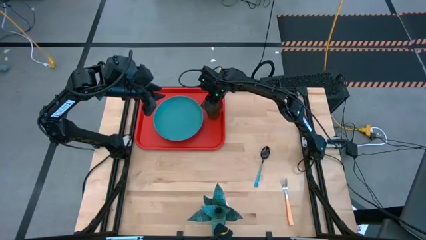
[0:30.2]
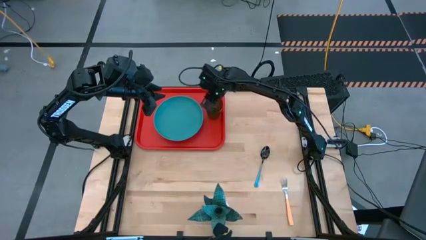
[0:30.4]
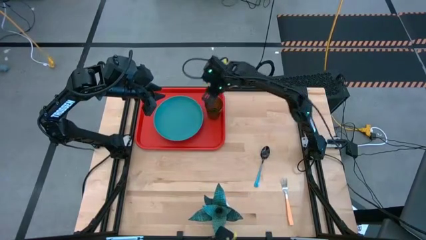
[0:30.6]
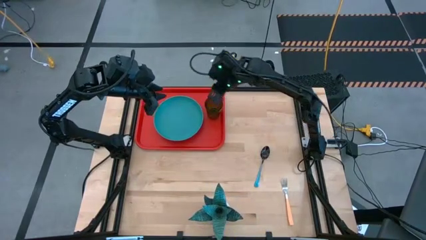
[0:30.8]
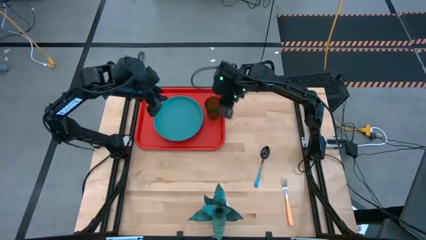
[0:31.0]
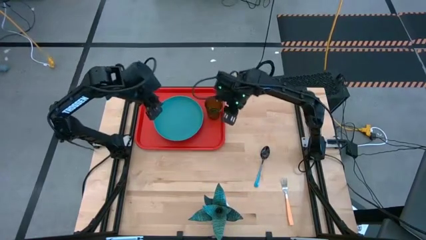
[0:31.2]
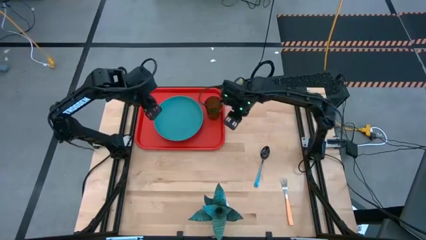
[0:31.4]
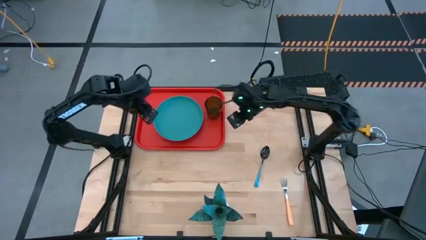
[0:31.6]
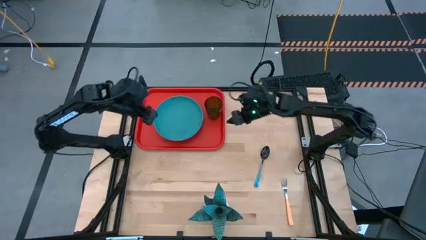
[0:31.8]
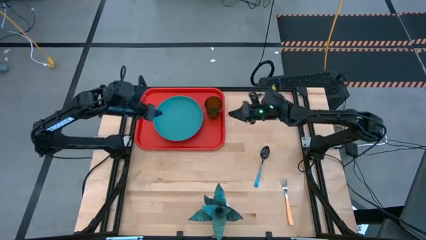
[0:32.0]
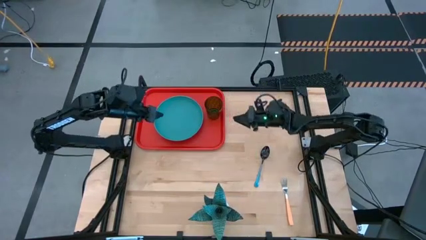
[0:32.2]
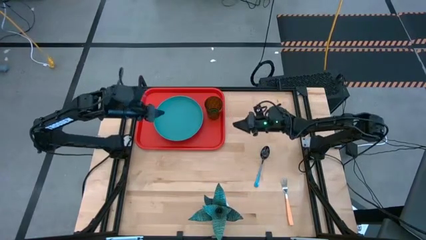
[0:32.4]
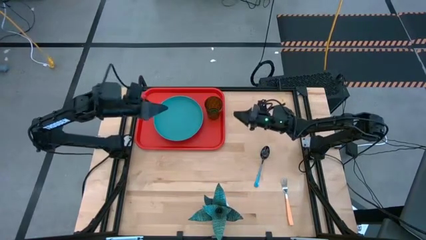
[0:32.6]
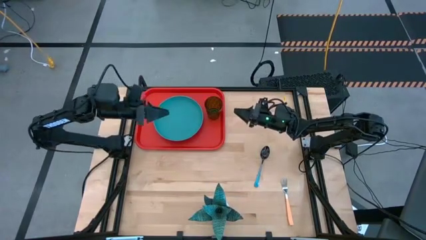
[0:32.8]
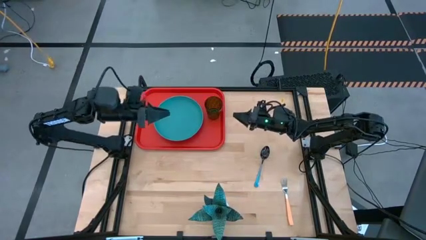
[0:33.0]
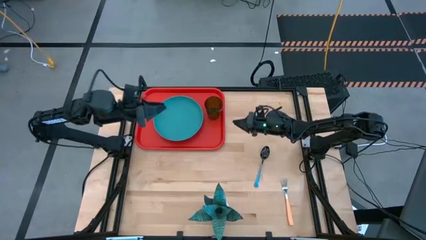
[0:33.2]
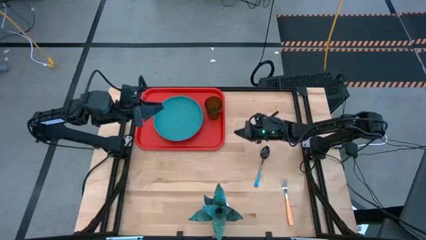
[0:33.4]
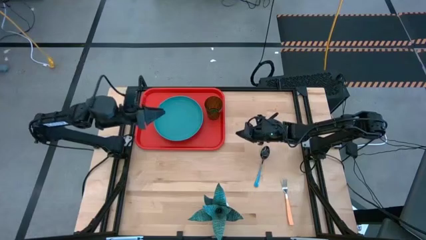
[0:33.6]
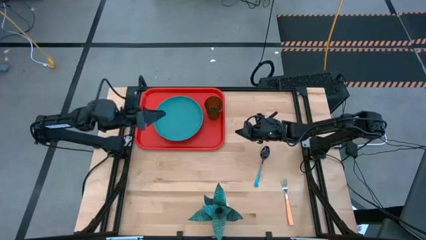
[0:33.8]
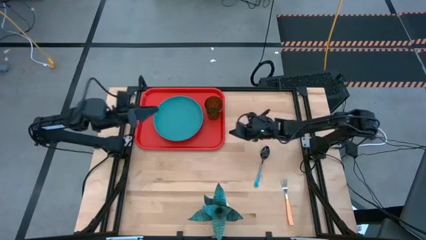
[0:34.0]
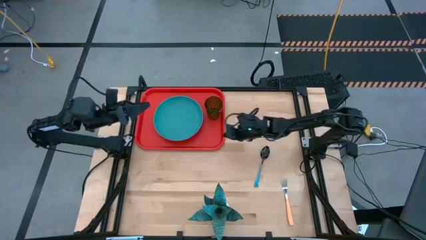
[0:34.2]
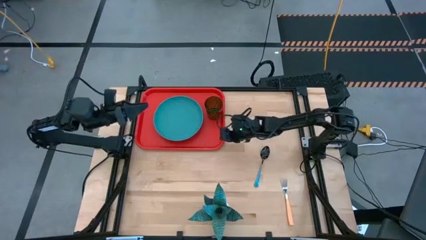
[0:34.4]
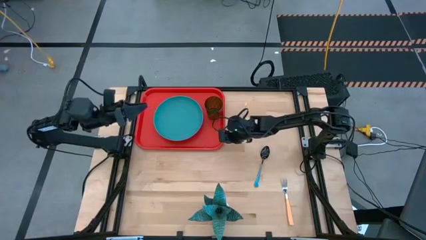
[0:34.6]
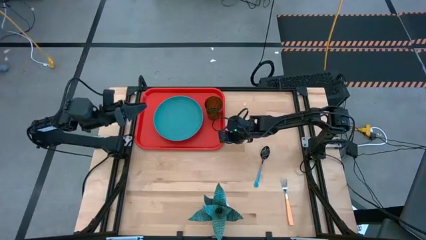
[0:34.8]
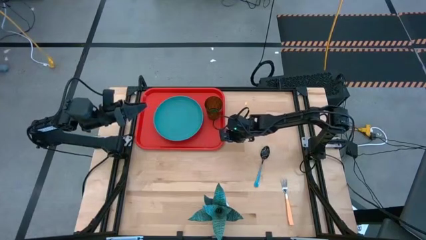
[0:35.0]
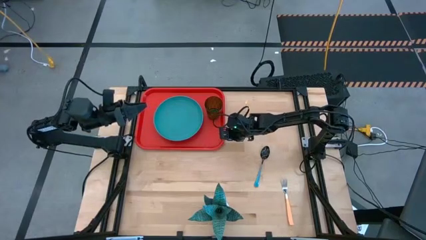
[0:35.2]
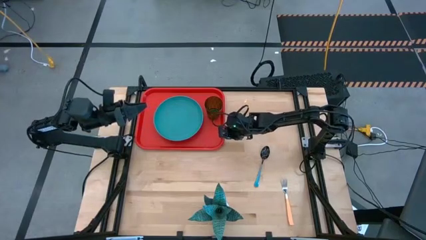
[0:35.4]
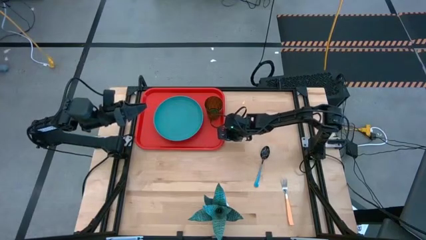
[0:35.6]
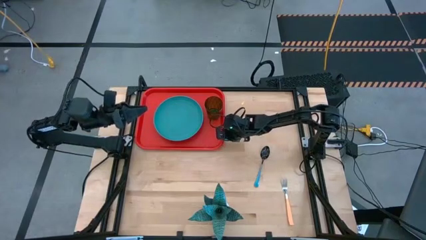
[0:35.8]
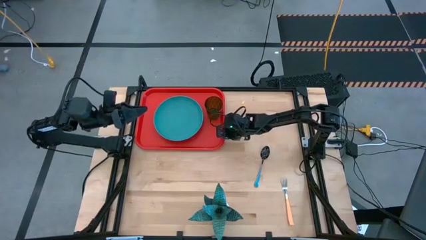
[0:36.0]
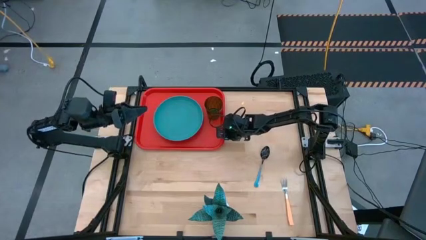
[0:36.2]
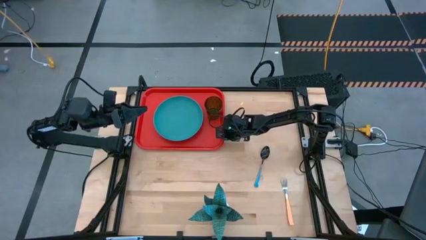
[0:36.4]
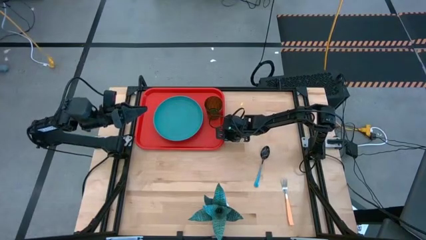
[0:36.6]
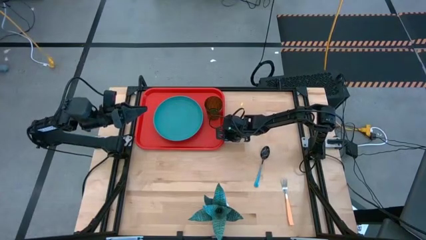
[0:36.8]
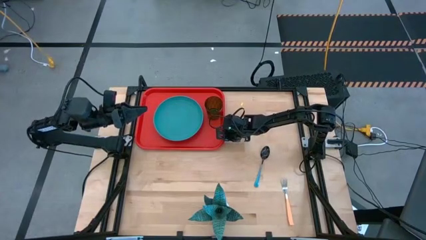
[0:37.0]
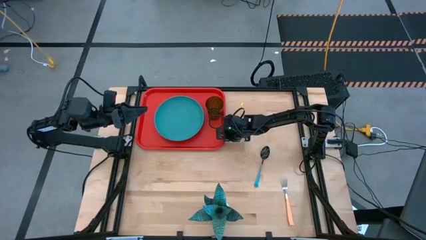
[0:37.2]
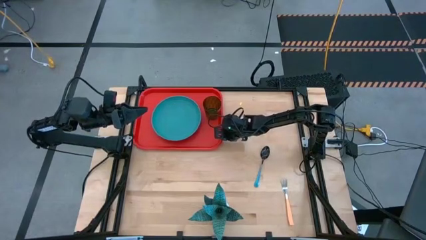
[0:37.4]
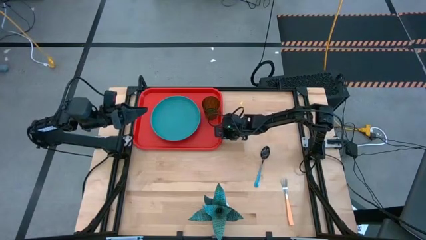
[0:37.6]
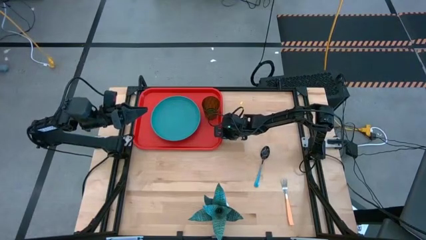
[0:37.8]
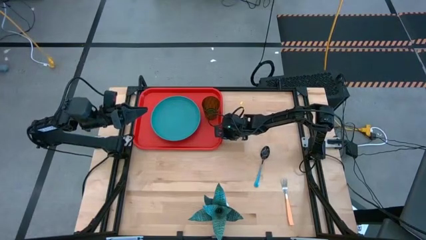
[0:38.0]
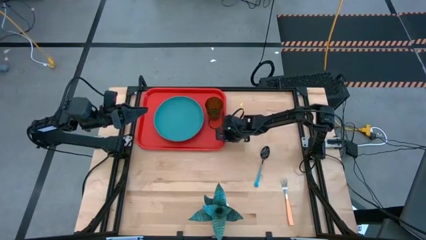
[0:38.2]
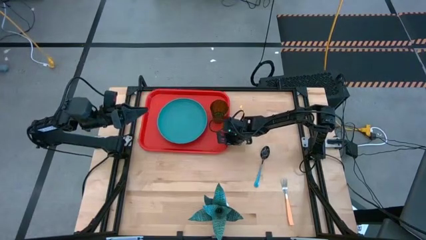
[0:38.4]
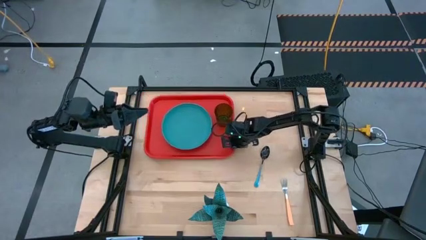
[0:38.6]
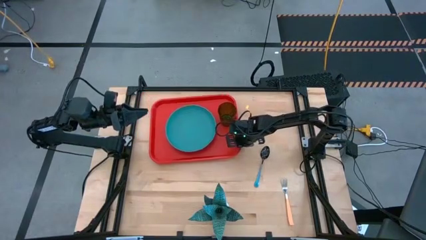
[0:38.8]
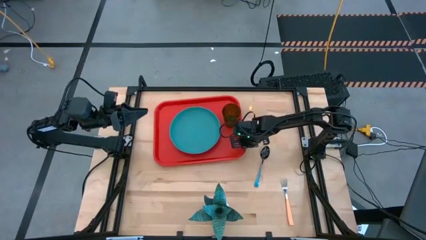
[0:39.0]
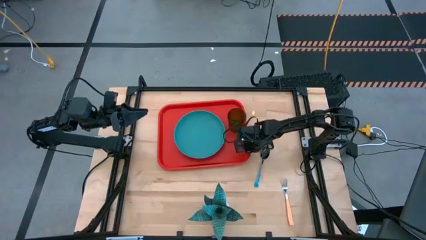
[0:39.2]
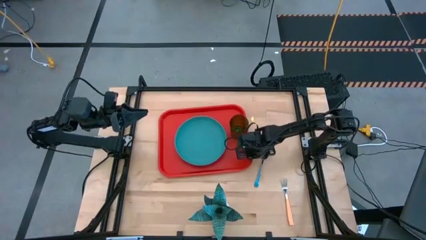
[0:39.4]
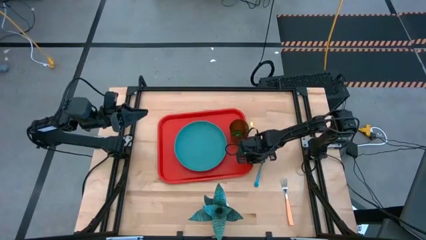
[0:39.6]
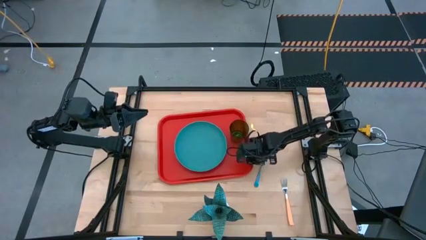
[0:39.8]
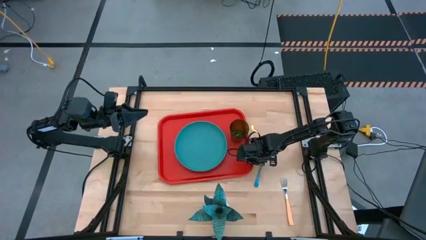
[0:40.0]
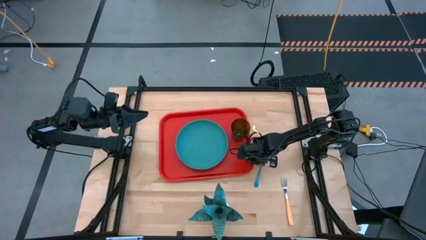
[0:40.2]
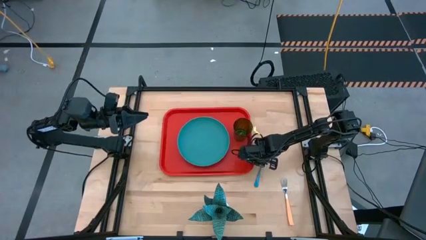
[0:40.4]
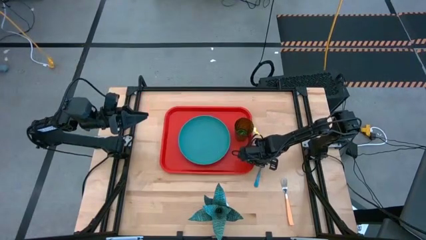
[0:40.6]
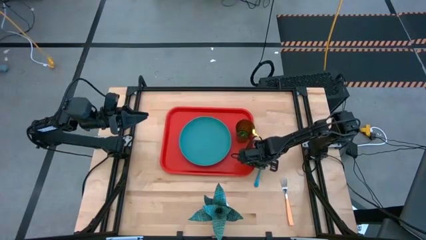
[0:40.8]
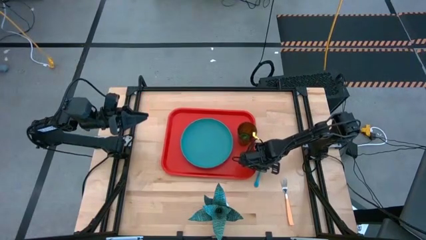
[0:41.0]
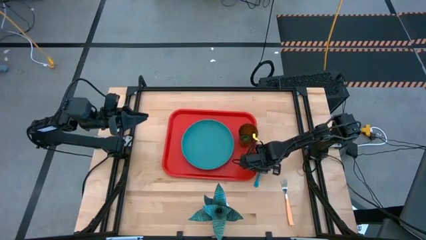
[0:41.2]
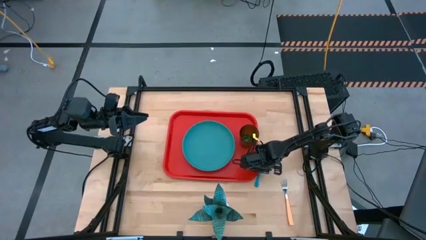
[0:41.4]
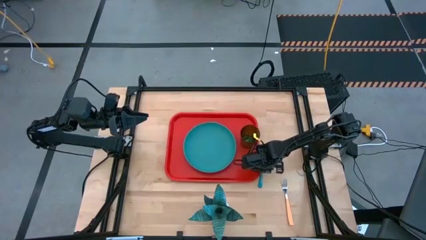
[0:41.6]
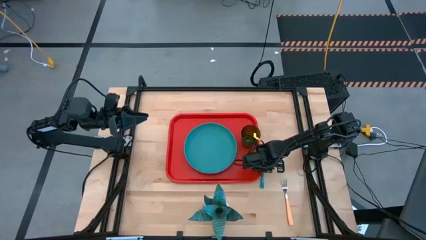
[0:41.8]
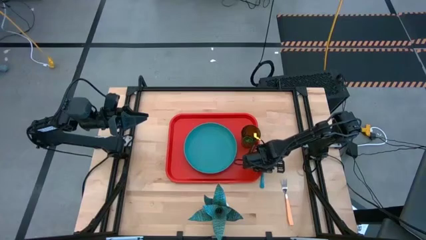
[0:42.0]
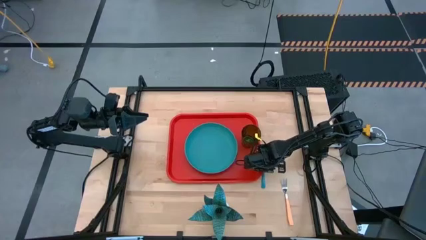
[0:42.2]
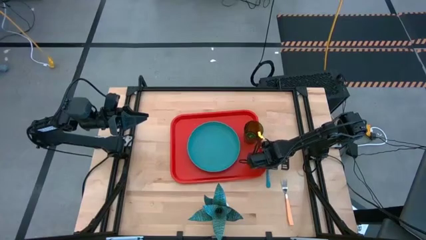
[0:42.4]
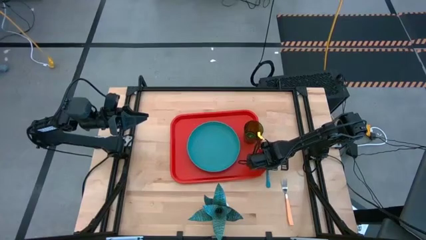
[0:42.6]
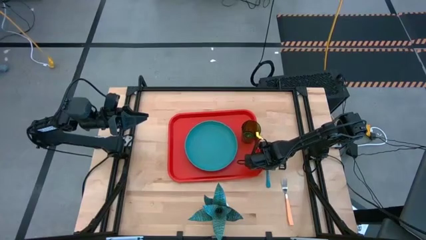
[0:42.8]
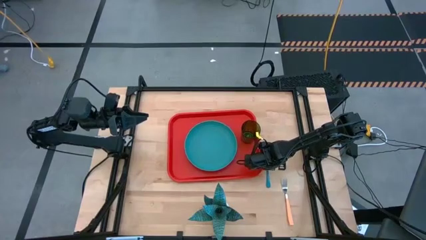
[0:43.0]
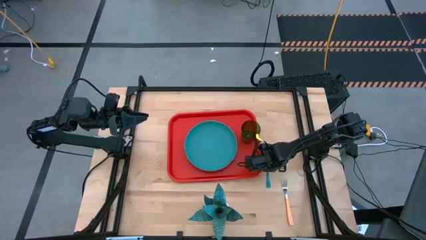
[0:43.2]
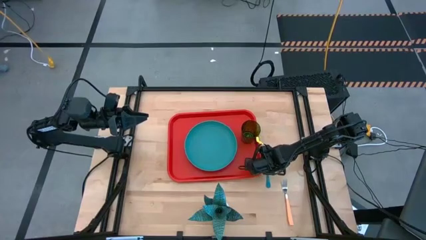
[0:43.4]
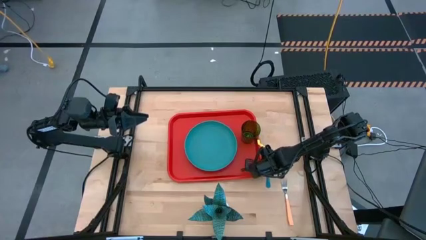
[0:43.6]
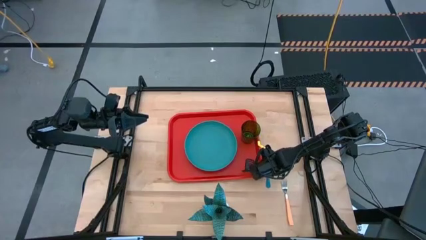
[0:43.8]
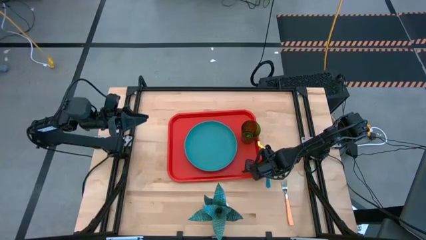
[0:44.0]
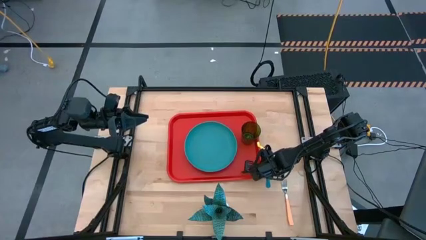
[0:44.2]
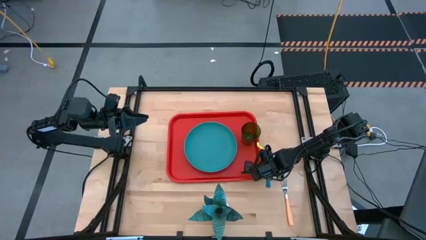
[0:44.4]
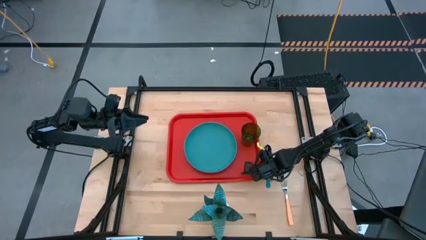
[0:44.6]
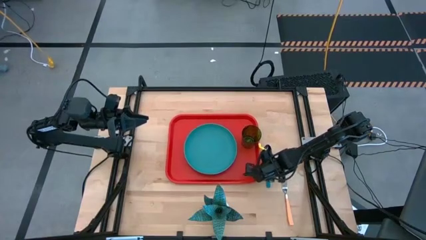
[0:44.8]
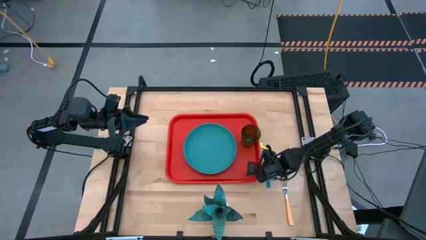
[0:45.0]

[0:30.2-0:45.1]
Task: Pick and place plate/cup/fork/spoon on tray
Move the orange tray to the center of the table
